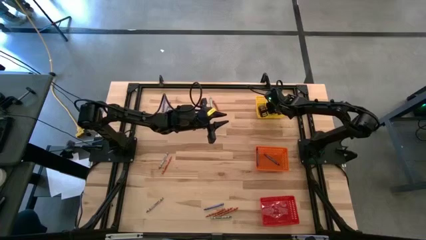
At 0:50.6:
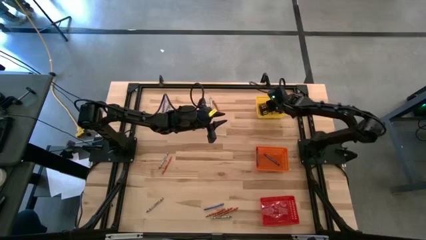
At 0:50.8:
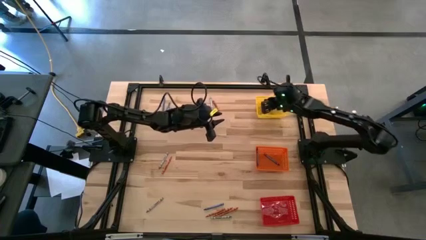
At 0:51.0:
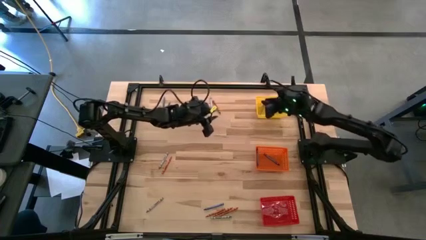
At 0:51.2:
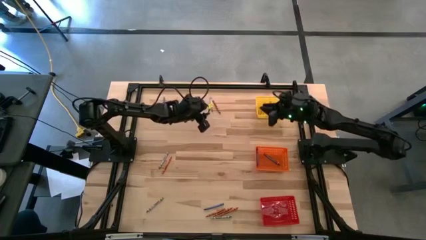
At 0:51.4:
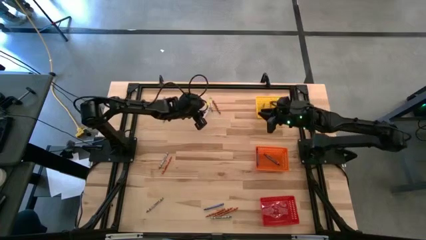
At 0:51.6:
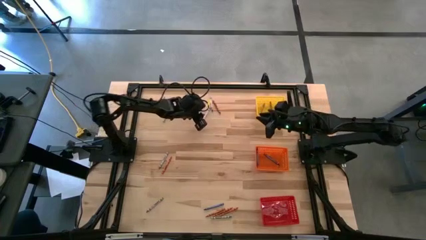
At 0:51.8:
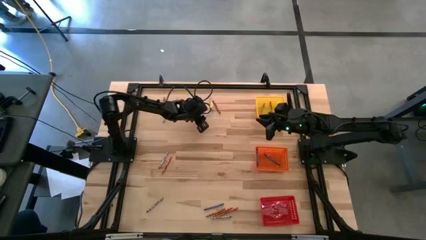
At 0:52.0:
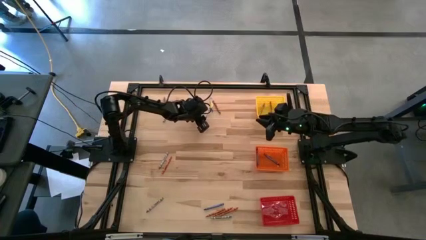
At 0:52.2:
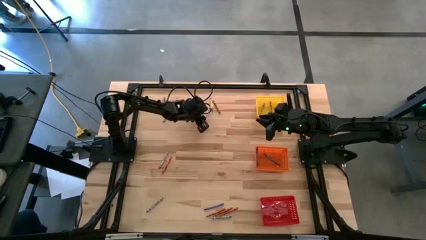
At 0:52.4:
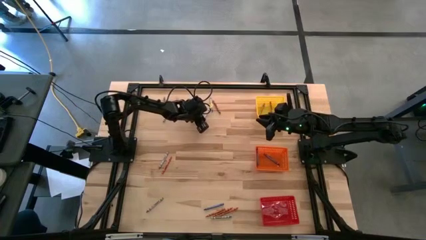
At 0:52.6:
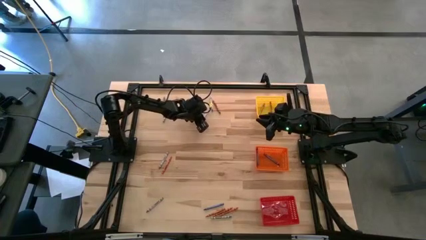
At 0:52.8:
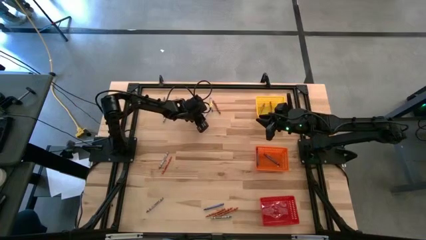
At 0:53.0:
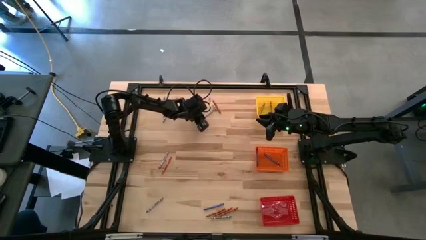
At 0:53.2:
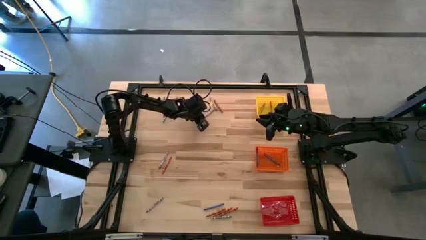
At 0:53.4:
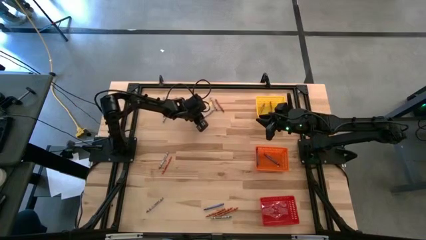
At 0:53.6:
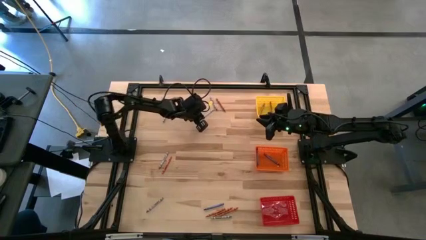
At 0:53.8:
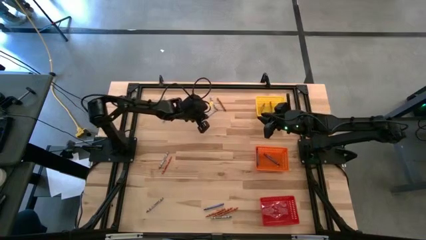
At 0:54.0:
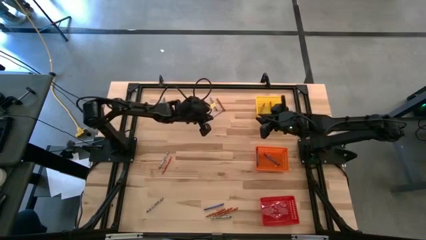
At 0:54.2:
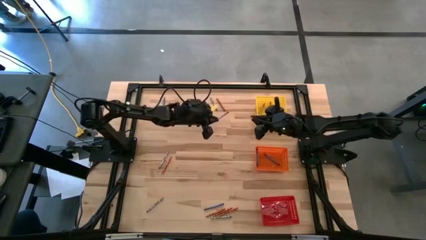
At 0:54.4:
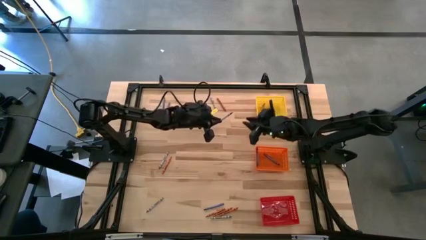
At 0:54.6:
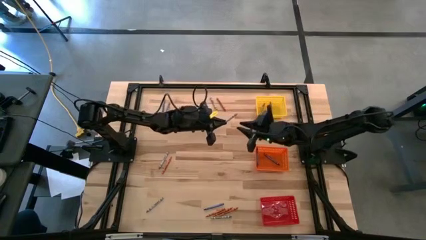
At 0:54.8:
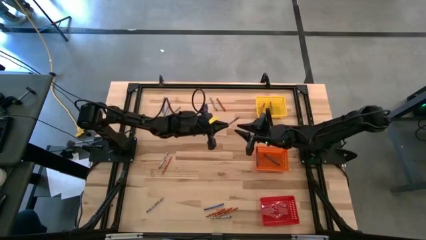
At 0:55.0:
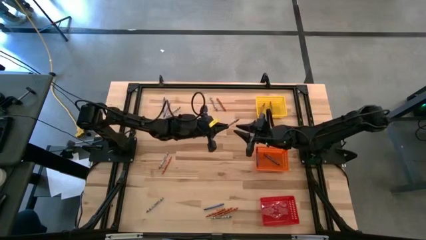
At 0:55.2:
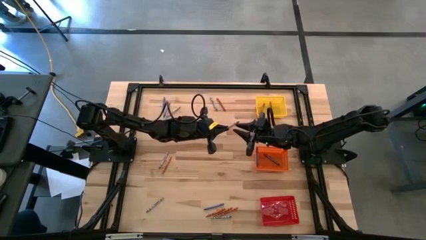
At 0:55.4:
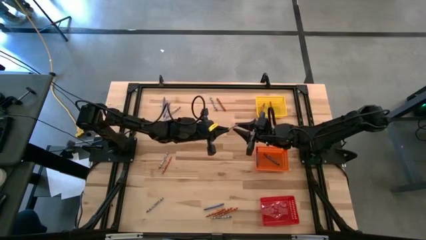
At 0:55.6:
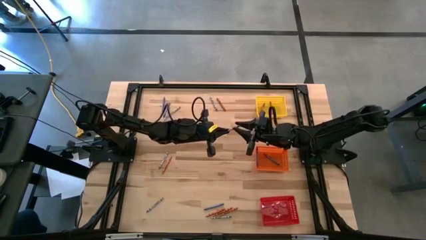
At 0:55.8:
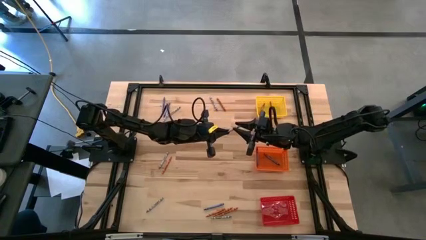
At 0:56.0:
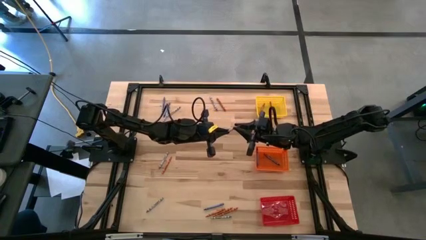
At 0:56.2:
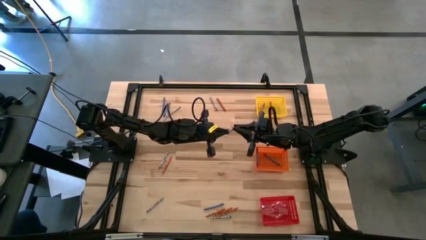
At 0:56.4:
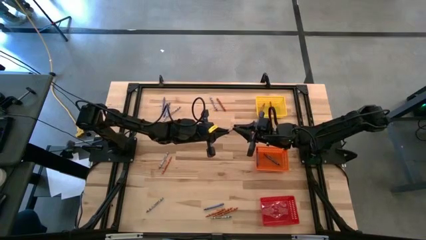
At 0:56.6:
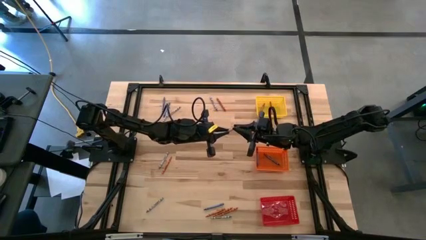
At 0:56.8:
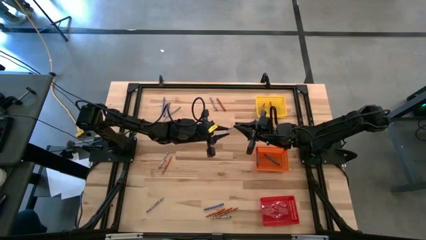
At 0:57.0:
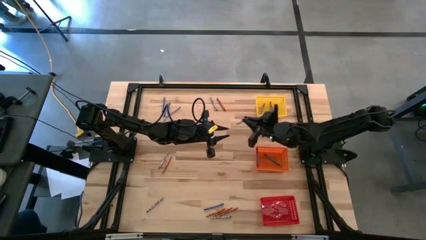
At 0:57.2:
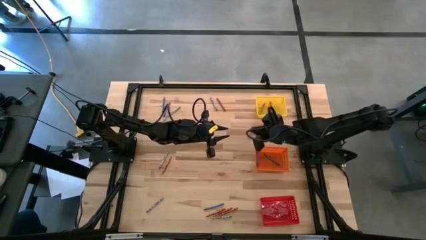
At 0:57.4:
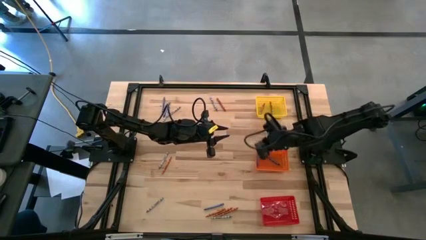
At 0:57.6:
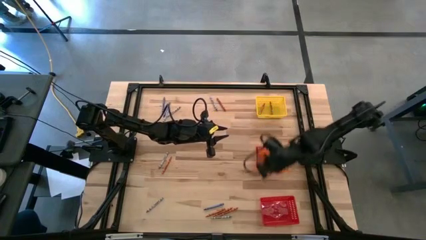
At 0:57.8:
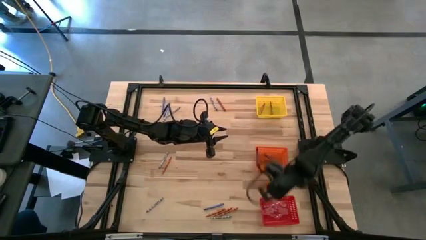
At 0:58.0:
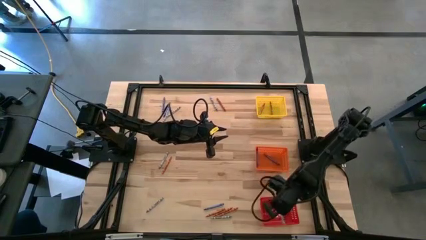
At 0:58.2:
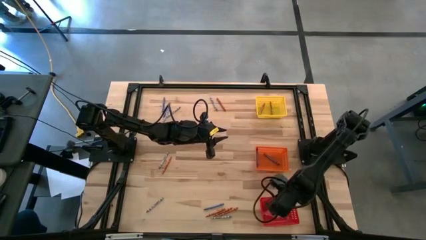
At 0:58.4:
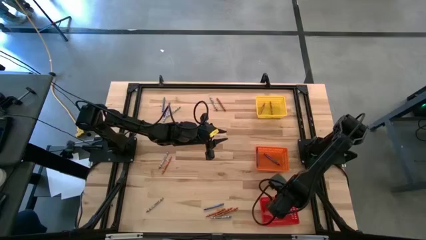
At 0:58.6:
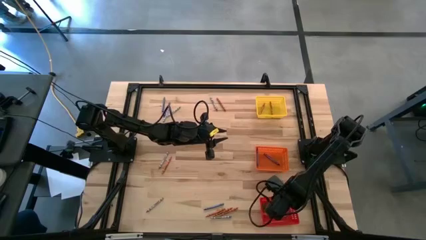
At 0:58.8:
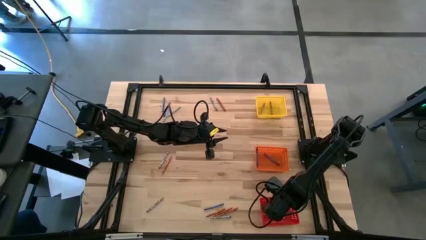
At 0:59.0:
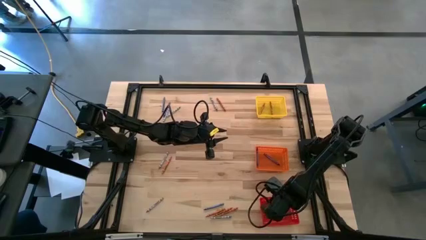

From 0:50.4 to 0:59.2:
Task: Sort crayons
Put the gray crayon into the red bin

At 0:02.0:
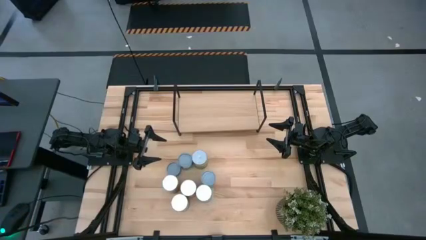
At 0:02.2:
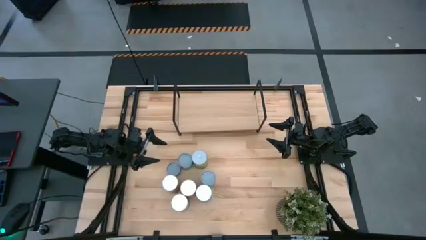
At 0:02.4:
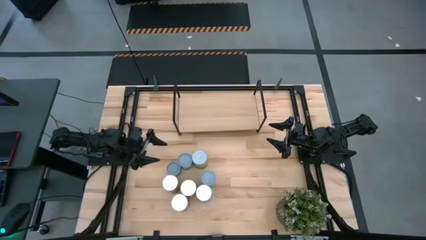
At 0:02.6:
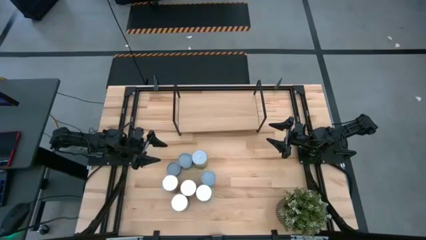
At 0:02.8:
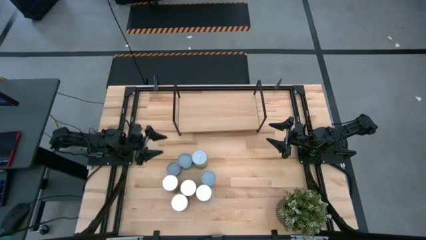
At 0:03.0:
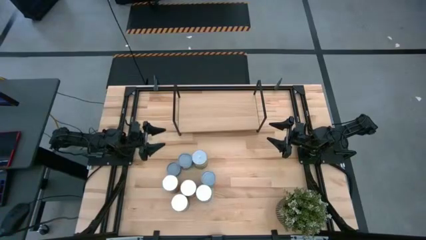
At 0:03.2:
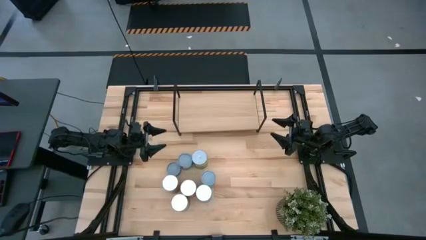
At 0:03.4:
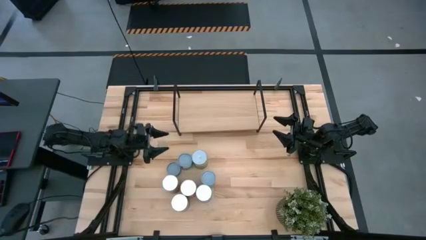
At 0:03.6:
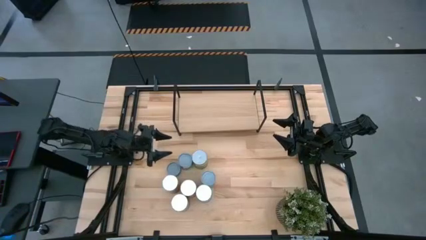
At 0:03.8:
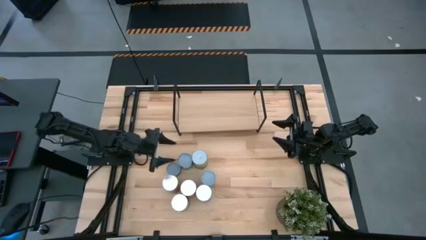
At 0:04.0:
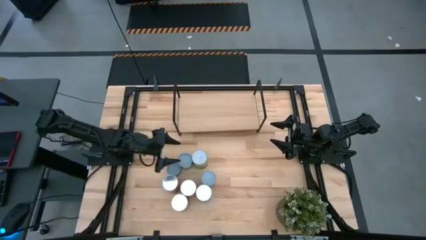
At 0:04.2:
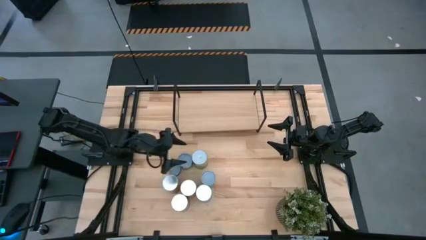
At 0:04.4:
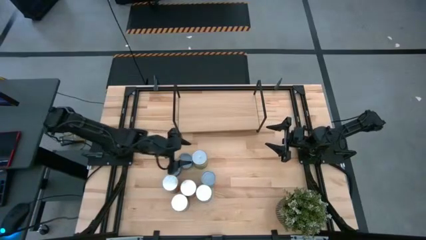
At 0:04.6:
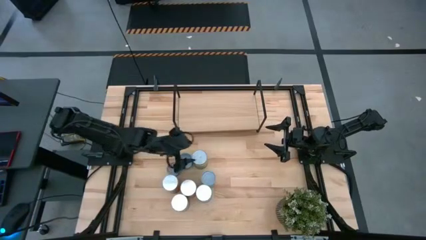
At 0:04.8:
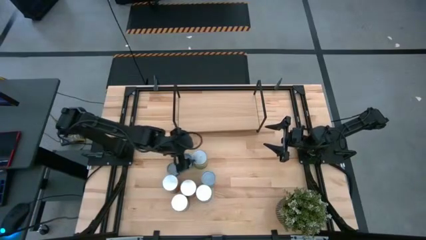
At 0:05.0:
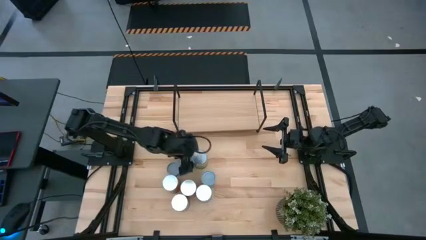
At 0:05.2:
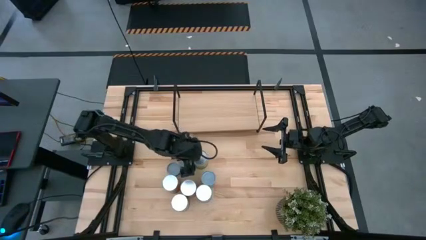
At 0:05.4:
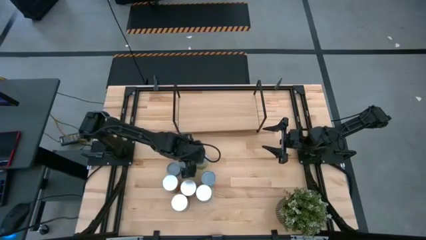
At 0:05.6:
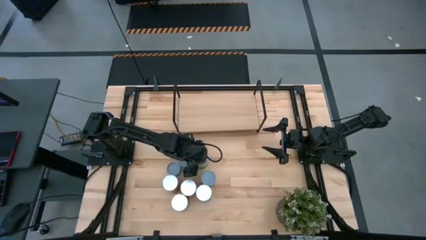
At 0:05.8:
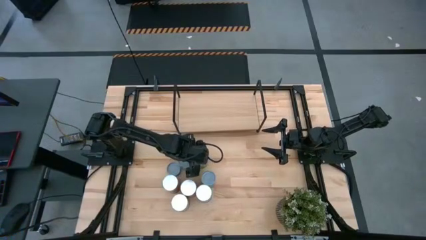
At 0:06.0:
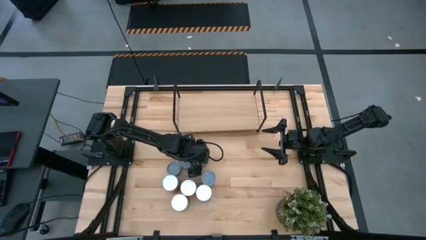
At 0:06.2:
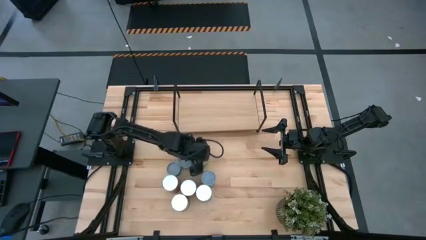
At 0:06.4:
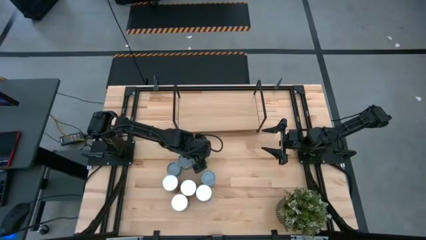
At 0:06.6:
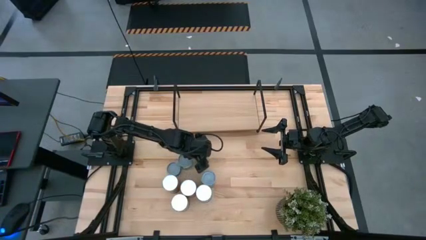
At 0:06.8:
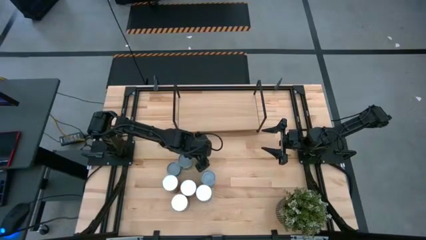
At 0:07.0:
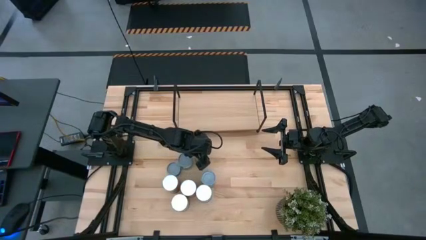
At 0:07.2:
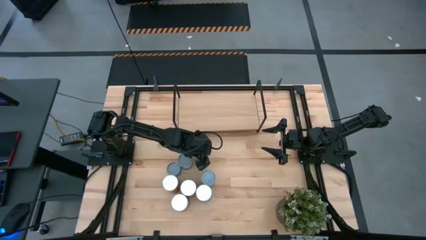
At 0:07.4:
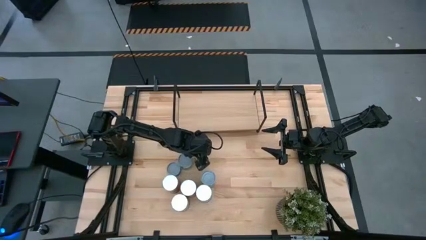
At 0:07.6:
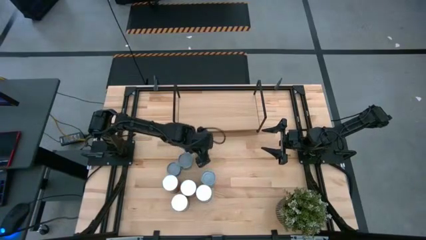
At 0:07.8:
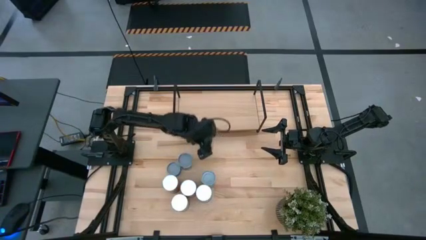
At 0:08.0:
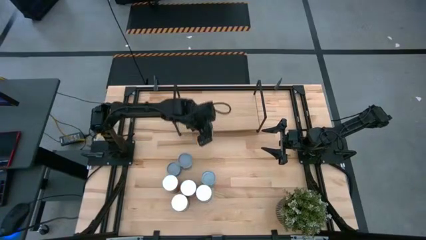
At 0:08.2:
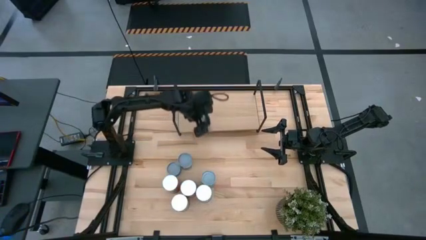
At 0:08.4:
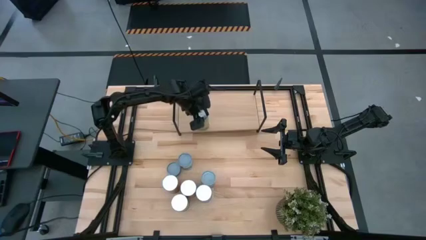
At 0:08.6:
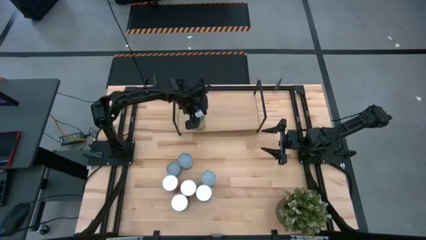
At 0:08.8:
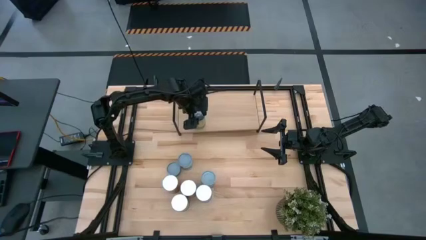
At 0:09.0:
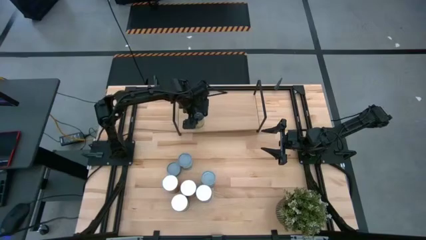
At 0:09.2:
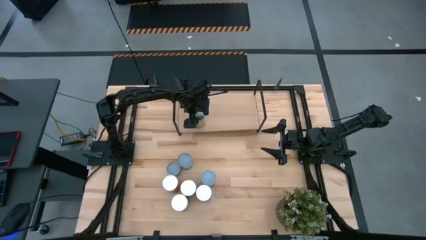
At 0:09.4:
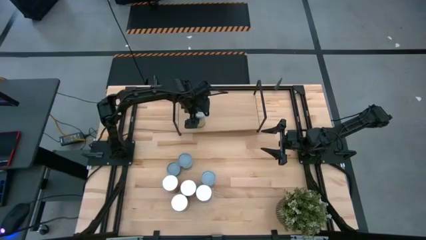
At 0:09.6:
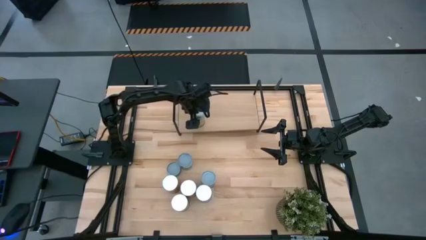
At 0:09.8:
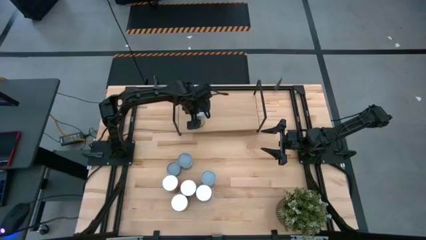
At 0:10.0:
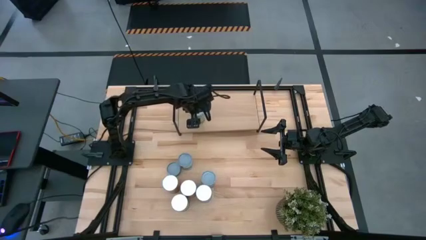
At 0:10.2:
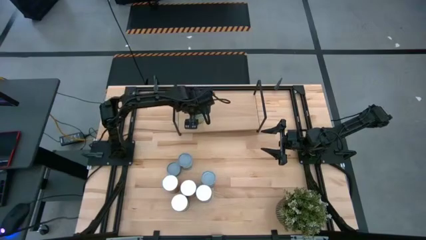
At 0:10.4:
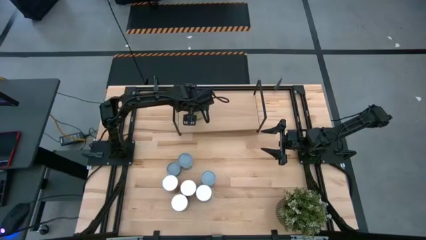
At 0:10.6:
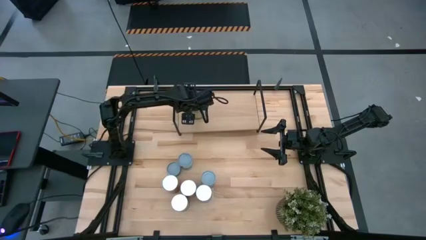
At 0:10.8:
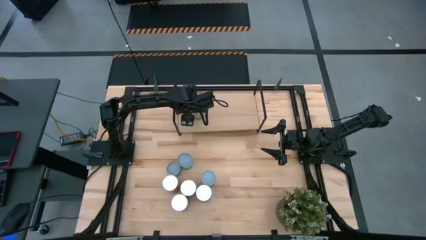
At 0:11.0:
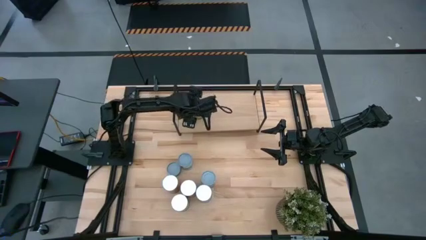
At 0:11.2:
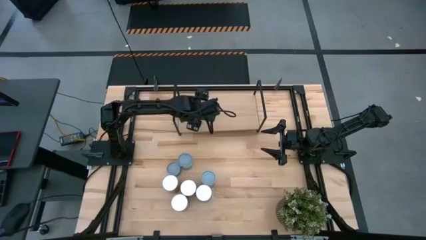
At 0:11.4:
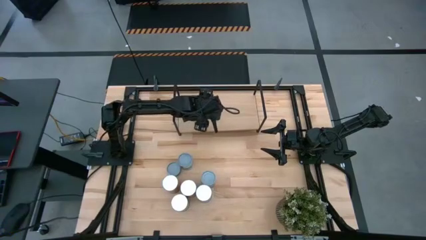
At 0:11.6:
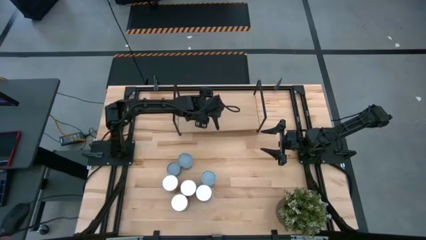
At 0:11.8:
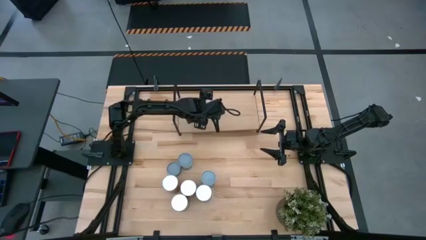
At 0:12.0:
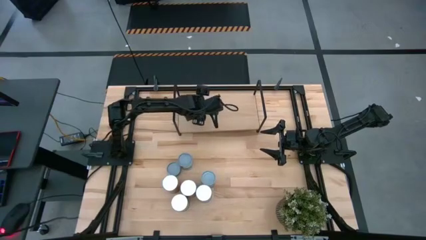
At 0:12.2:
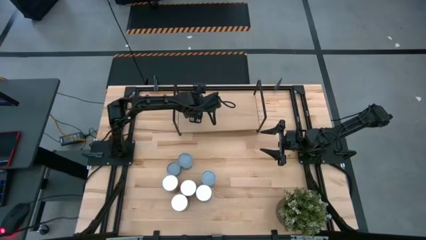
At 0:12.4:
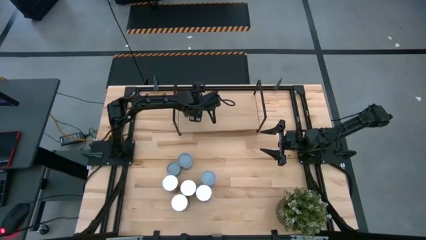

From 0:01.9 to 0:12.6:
Task: Pick and place cans onto a shelf
Put the canned oranges on the shelf
